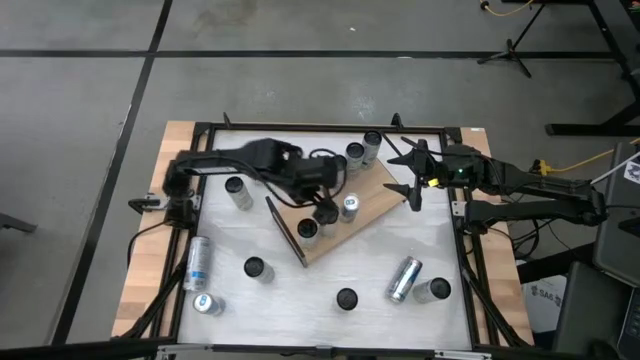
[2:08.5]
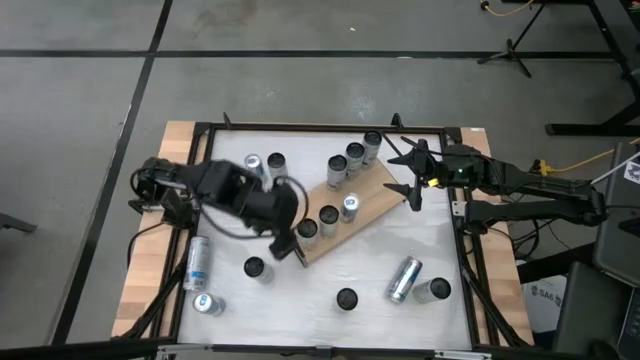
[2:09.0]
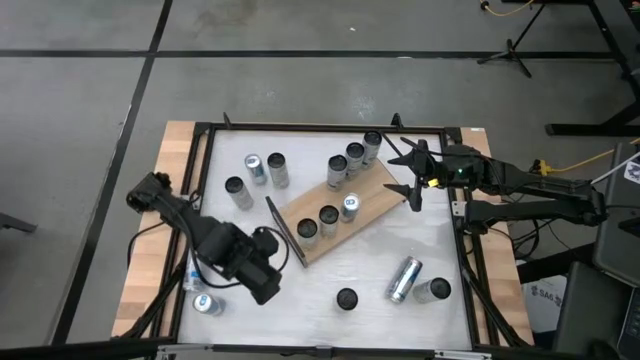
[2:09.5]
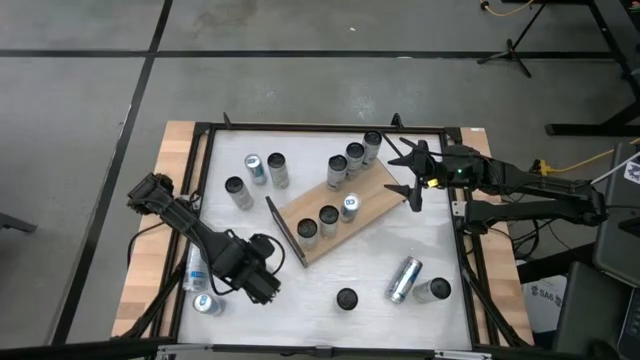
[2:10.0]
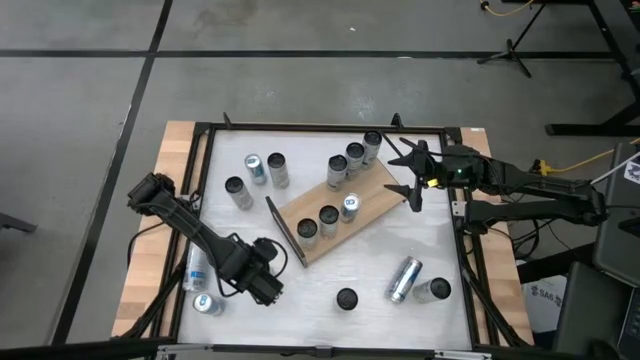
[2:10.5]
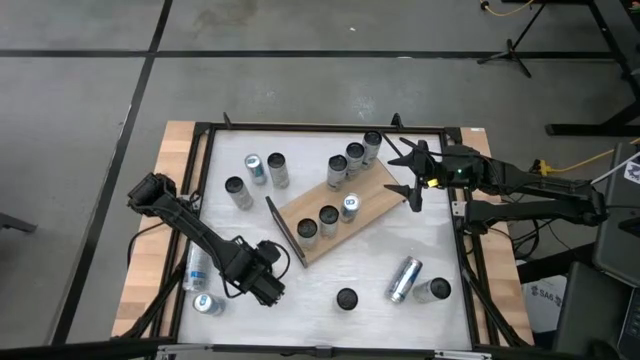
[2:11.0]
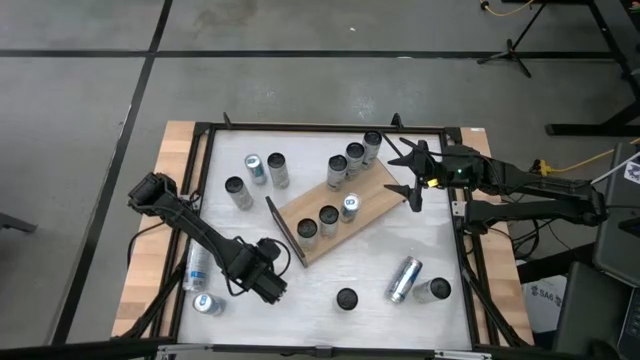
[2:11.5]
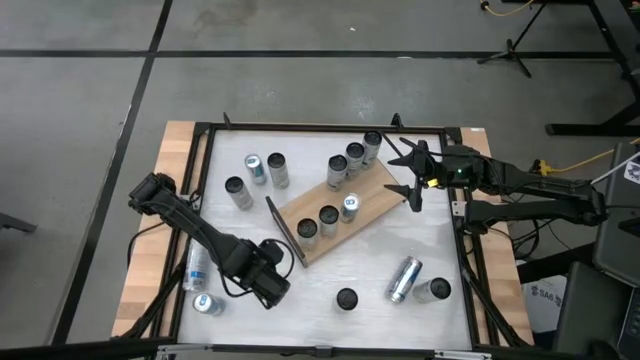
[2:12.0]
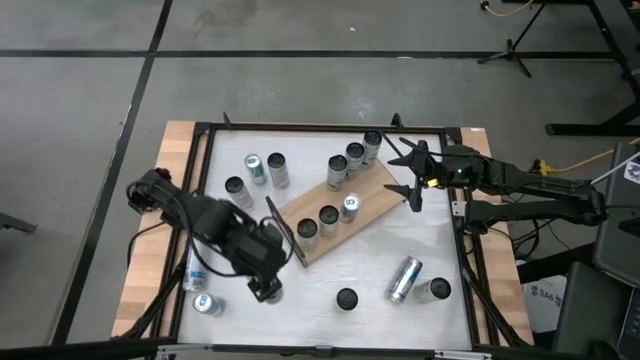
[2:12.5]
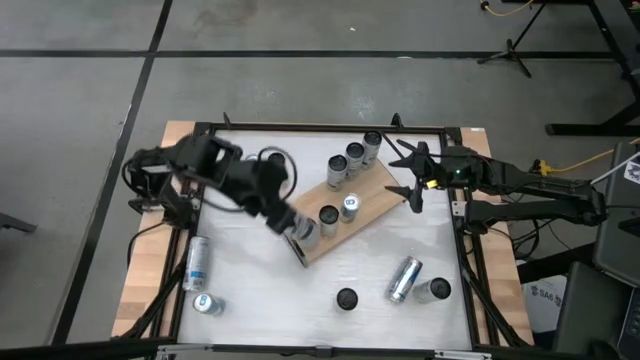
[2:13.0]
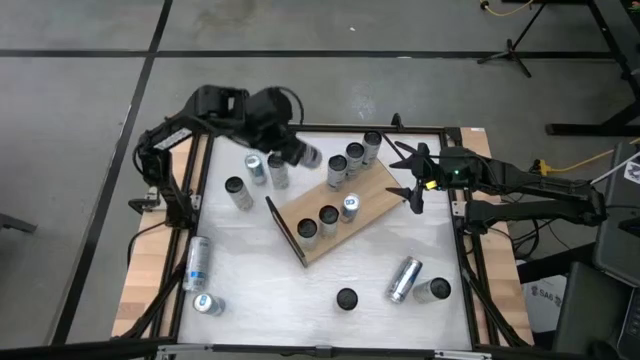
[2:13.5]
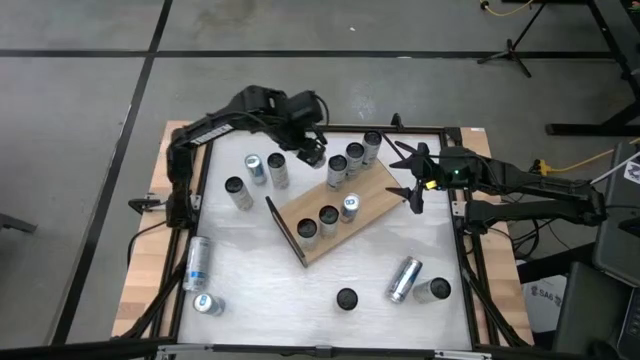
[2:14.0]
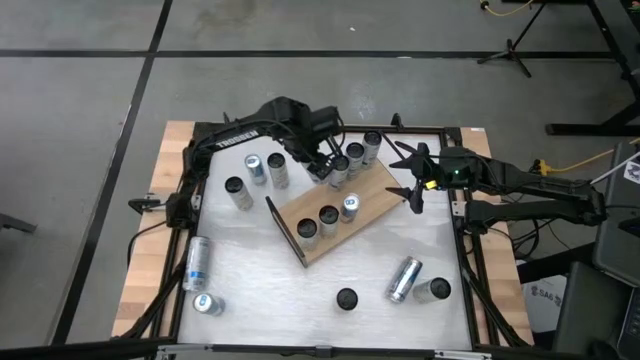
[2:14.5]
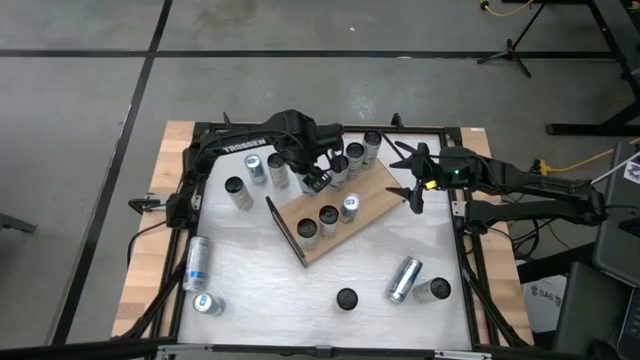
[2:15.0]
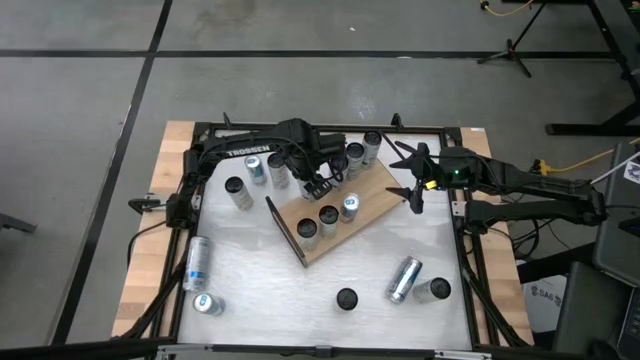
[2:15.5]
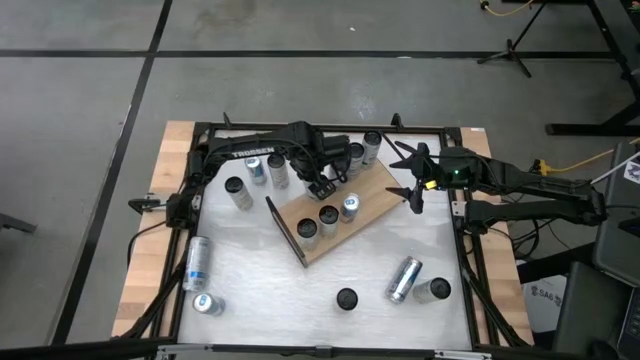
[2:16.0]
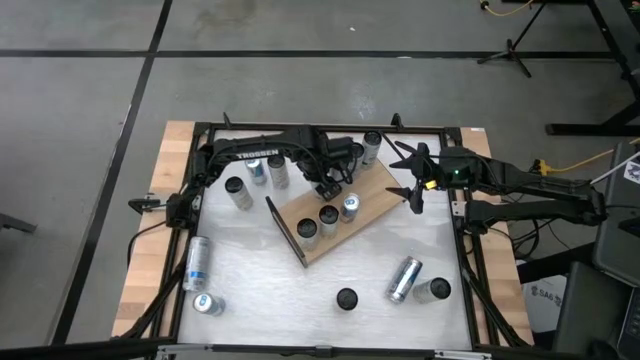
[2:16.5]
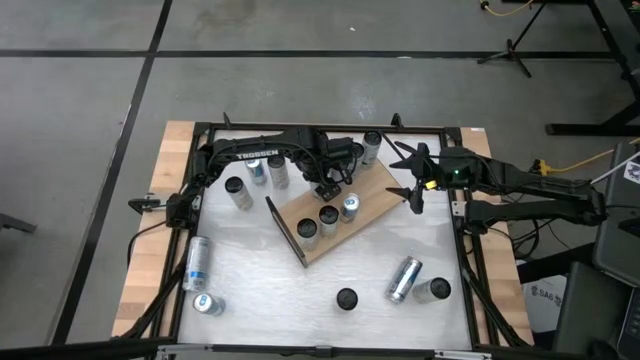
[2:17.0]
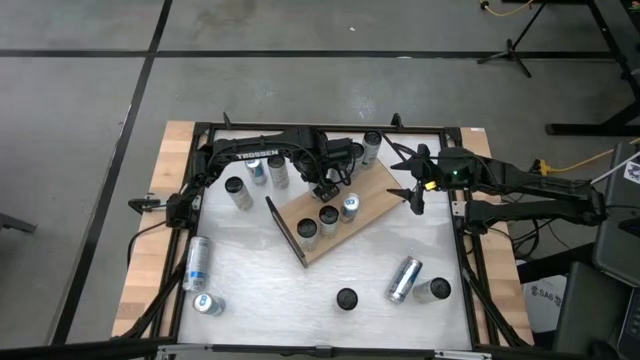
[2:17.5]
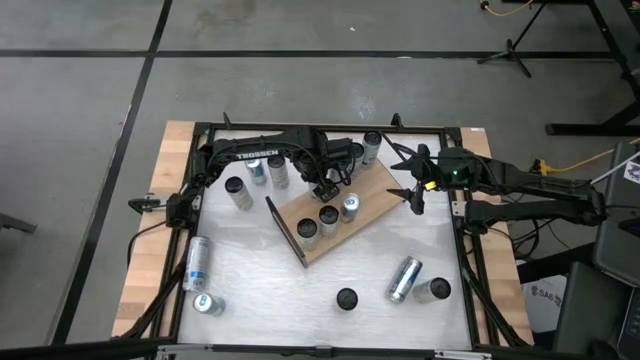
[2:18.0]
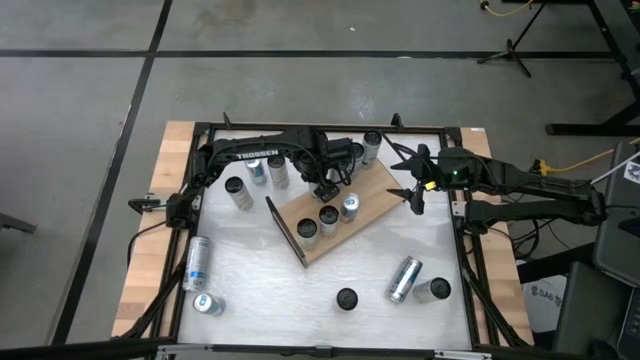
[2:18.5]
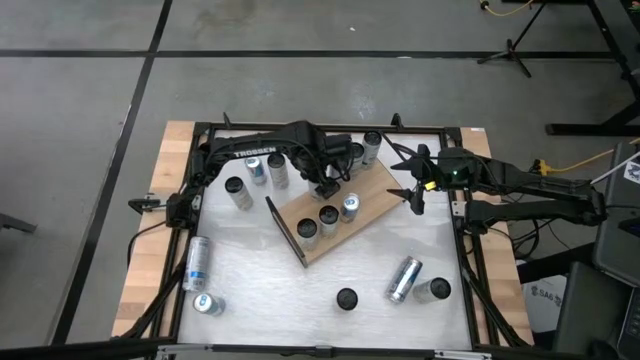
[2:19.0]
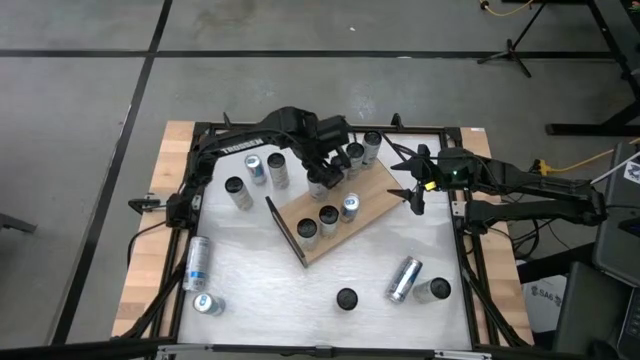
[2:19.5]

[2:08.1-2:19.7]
Task: Place canned beverage on shelf
Put the white blue soda can on the shelf

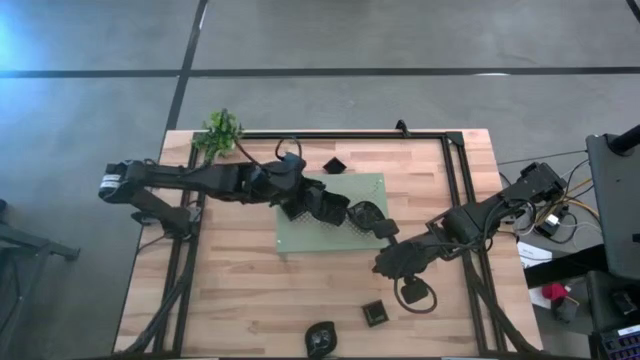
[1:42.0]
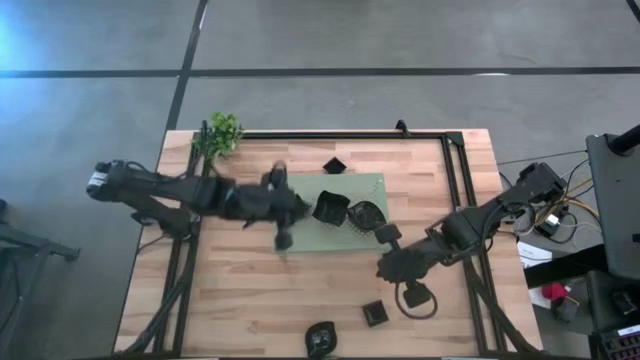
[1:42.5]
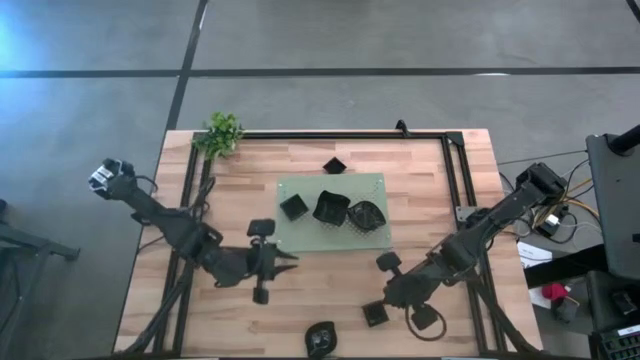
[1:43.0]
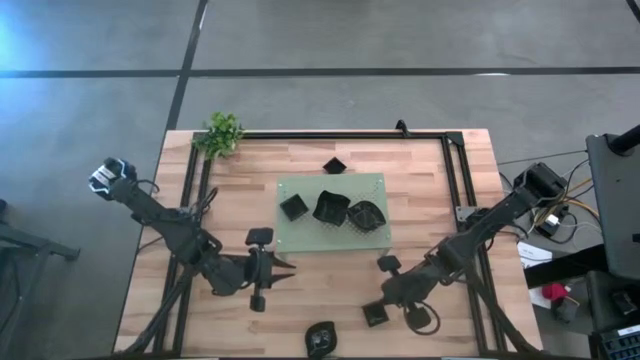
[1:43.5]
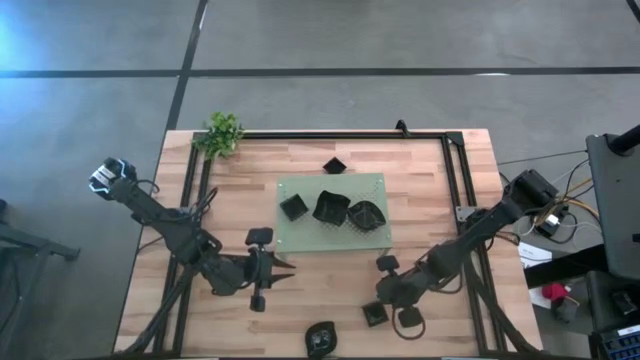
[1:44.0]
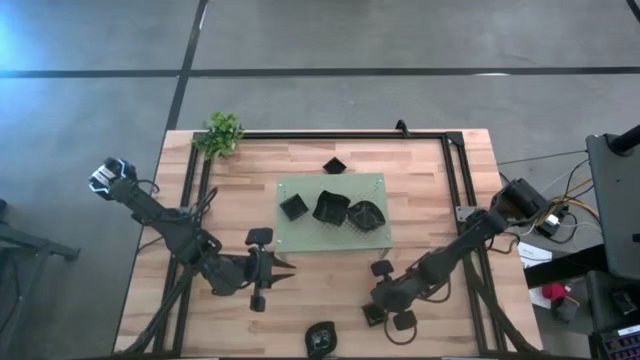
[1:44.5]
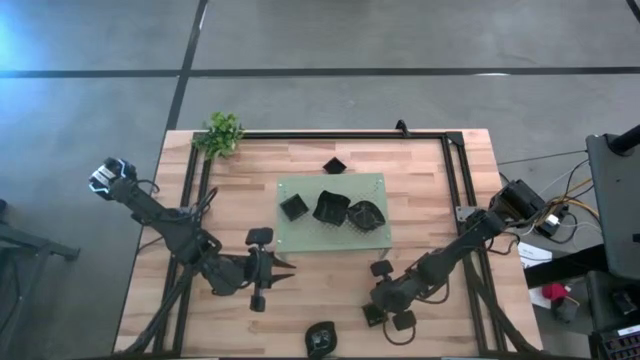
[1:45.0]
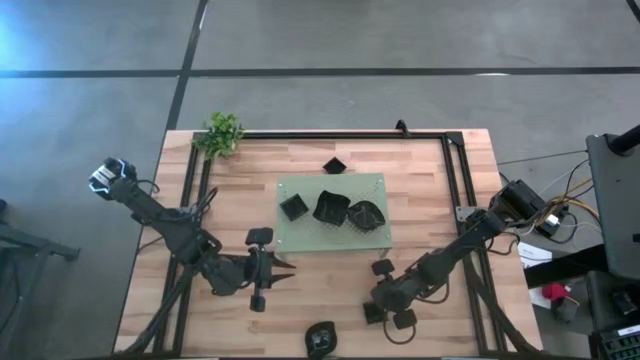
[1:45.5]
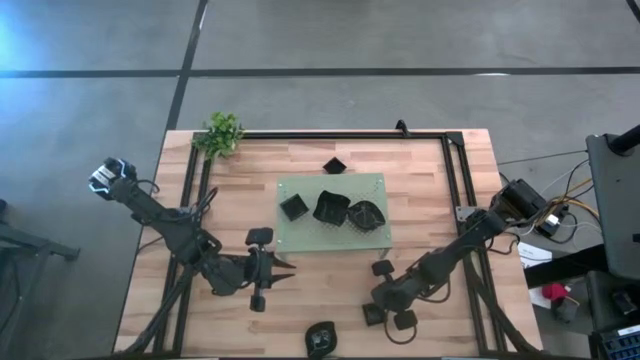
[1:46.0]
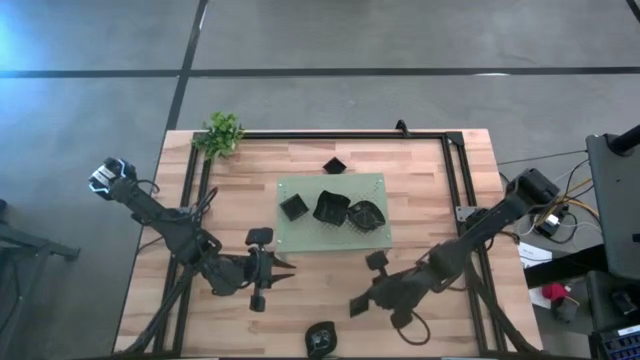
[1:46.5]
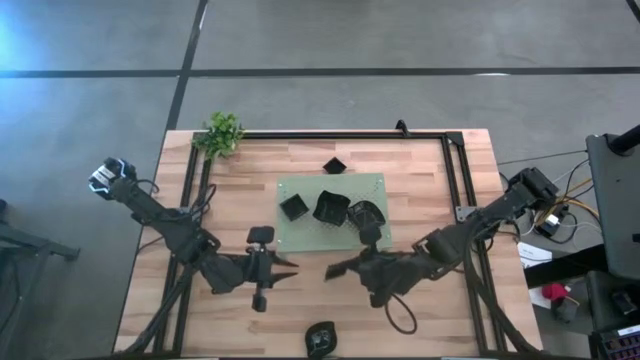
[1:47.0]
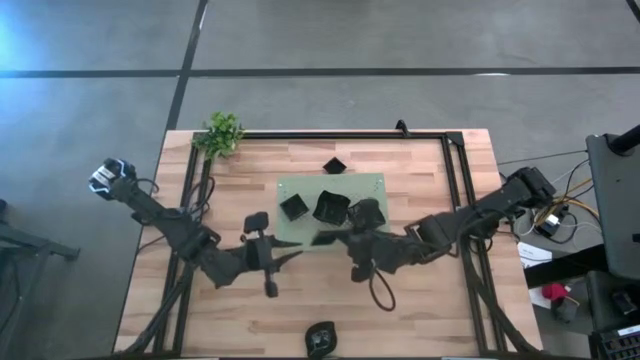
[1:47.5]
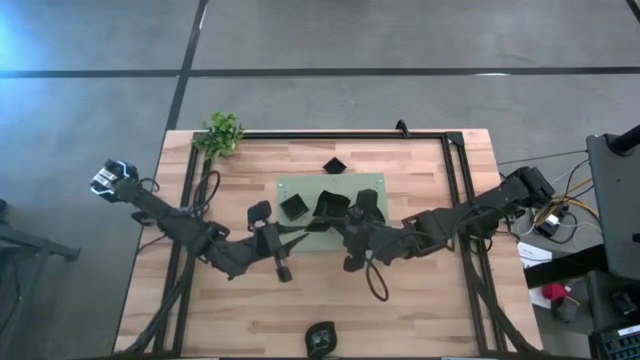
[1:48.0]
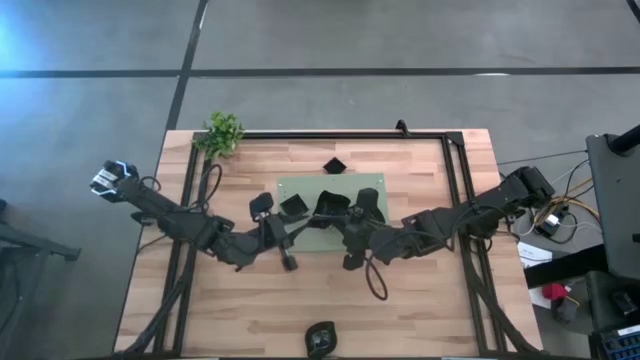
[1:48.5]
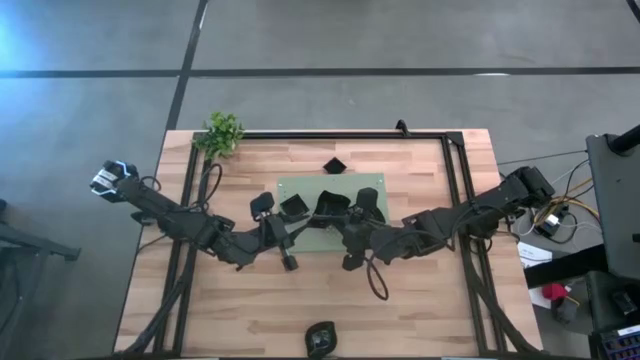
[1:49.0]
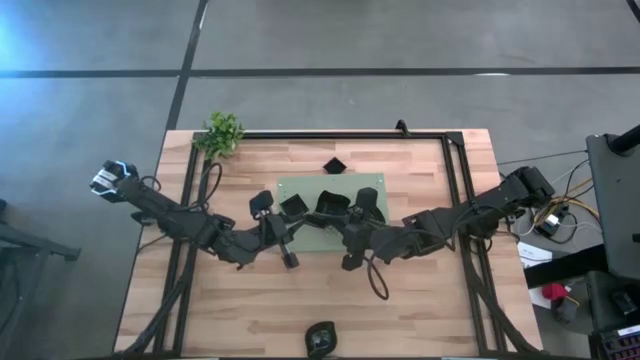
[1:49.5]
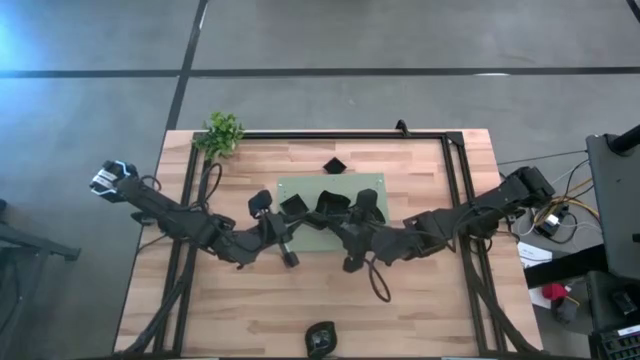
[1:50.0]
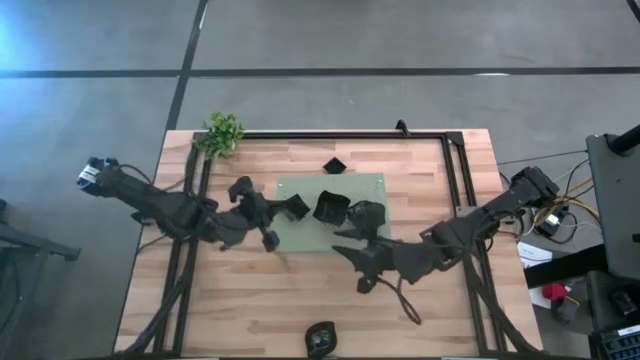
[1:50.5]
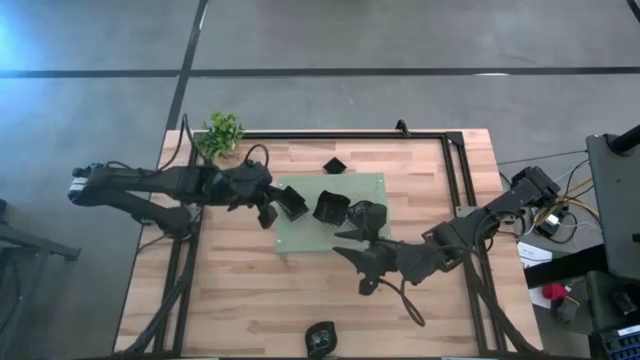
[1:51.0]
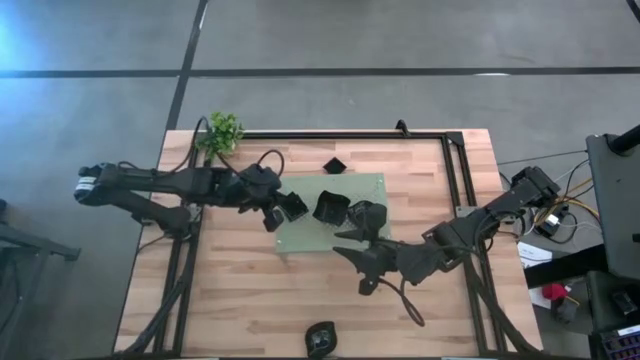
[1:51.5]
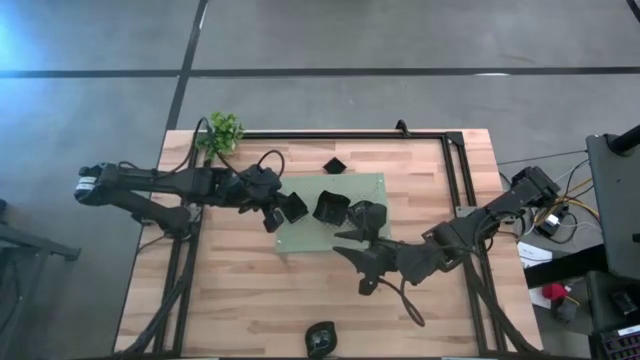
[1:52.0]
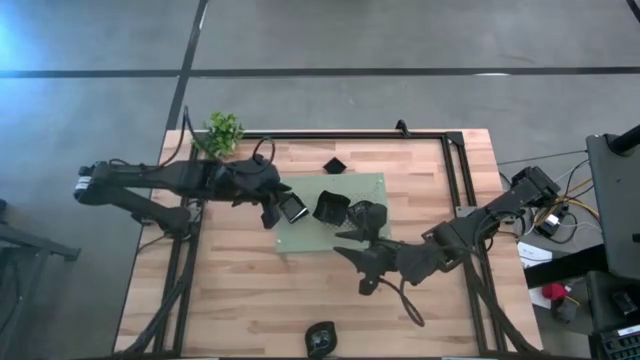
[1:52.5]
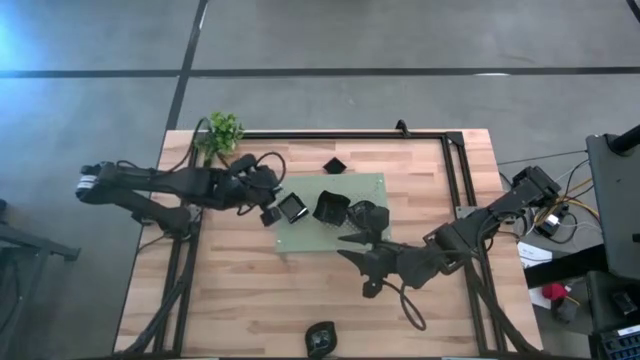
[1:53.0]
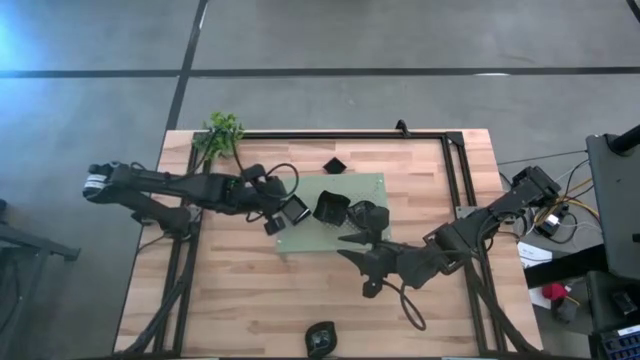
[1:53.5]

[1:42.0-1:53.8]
Task: Pick & Place Mini shaped plates
Stack the square plate on top of the square plates on the shelf
